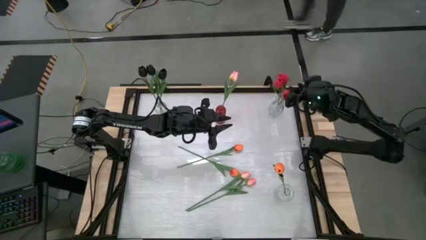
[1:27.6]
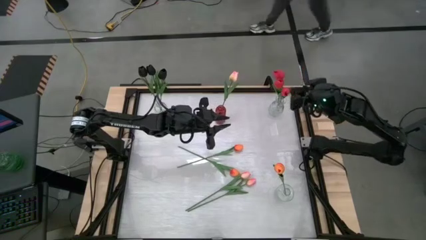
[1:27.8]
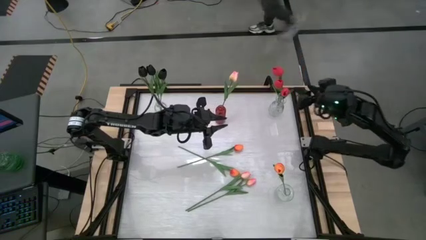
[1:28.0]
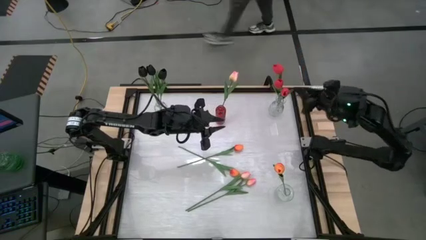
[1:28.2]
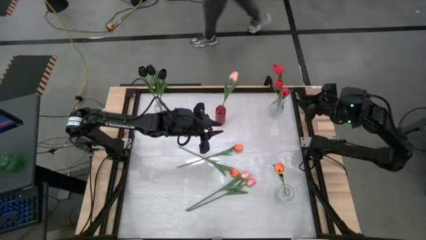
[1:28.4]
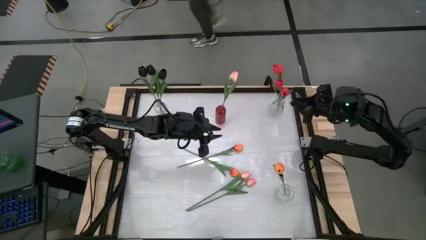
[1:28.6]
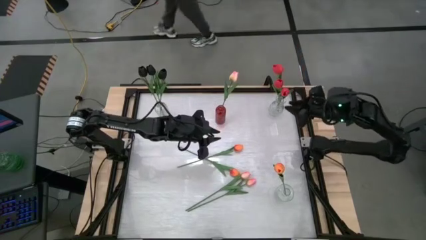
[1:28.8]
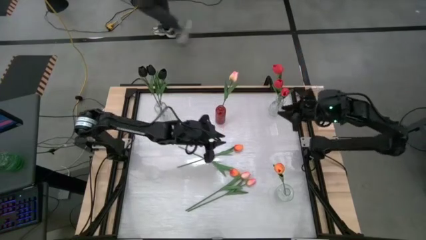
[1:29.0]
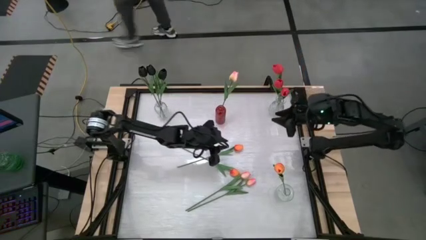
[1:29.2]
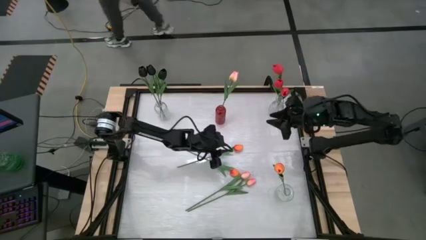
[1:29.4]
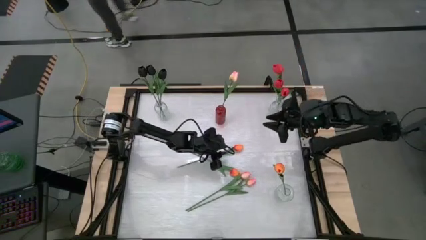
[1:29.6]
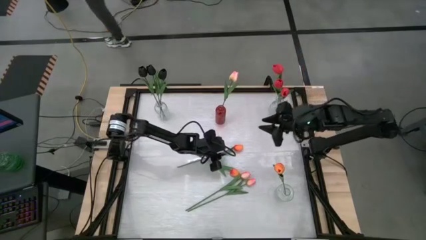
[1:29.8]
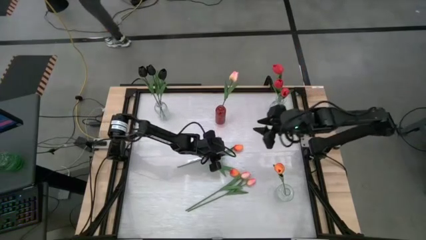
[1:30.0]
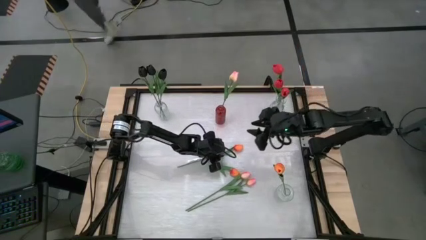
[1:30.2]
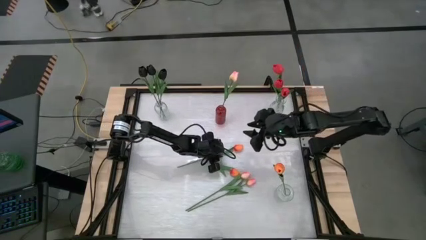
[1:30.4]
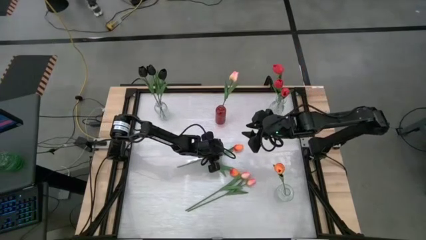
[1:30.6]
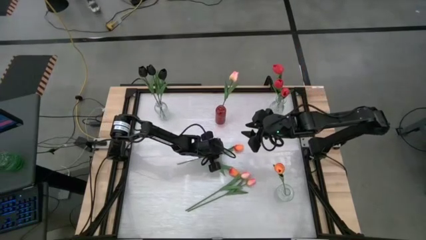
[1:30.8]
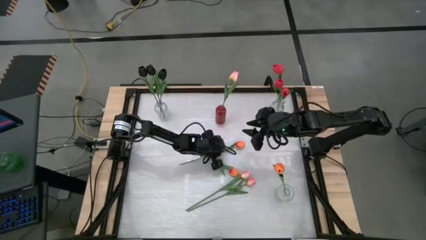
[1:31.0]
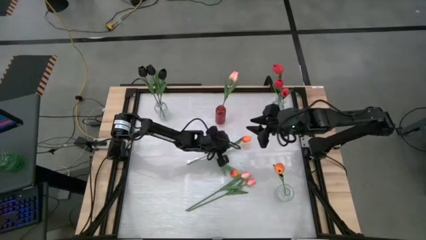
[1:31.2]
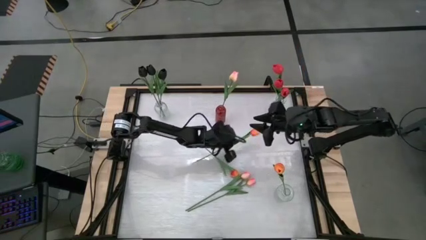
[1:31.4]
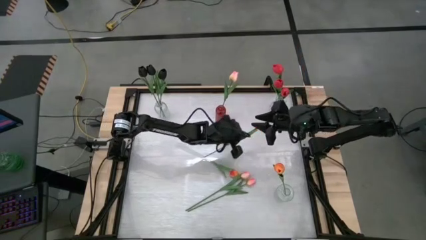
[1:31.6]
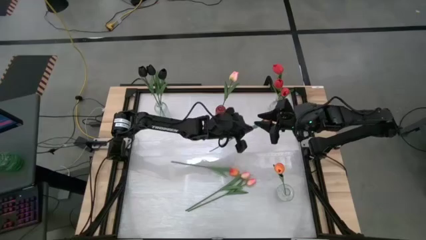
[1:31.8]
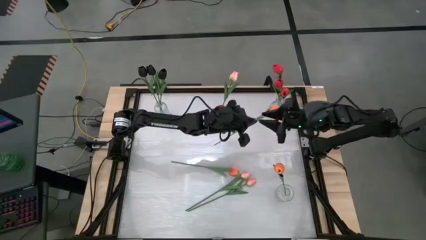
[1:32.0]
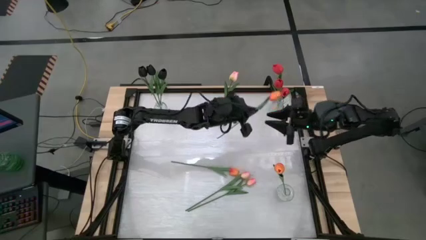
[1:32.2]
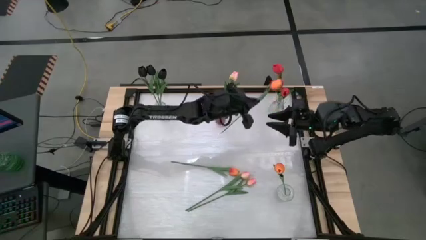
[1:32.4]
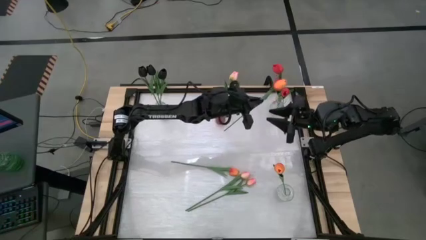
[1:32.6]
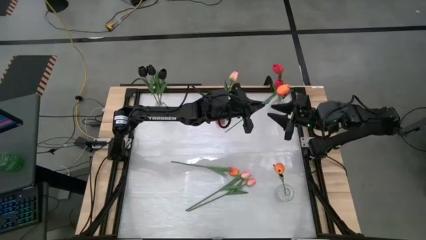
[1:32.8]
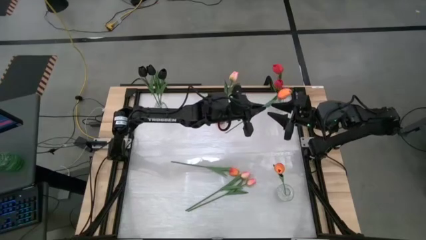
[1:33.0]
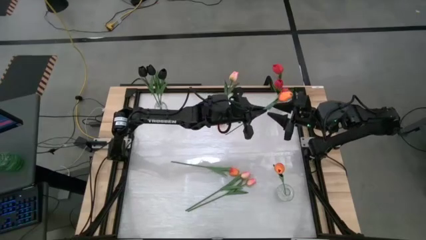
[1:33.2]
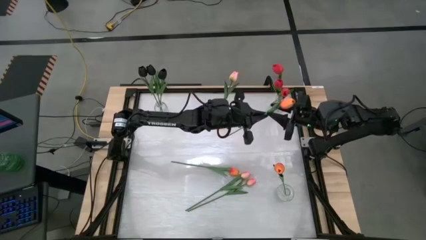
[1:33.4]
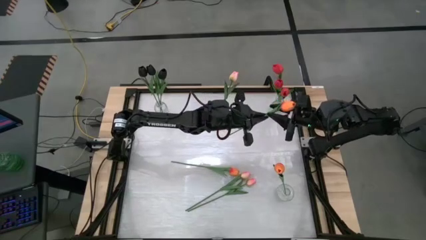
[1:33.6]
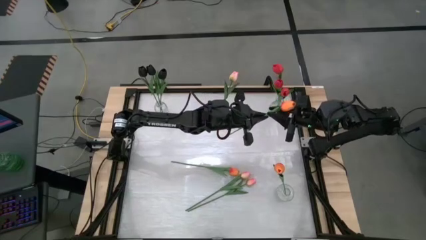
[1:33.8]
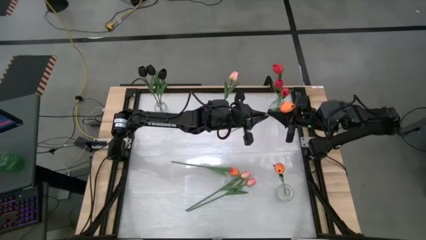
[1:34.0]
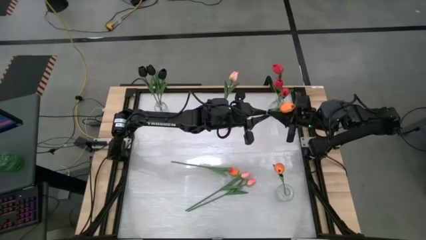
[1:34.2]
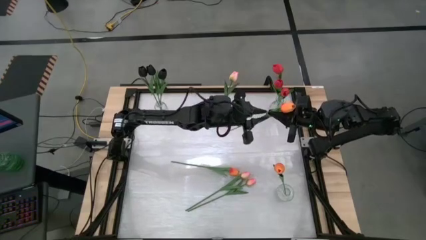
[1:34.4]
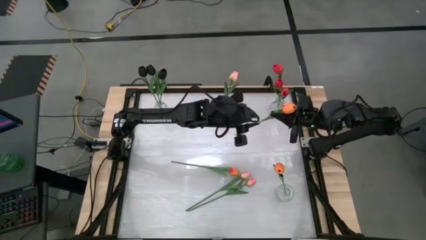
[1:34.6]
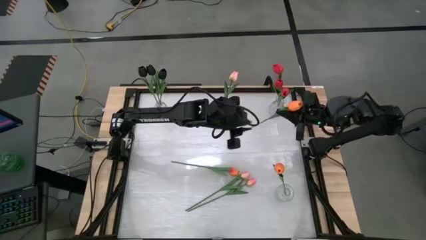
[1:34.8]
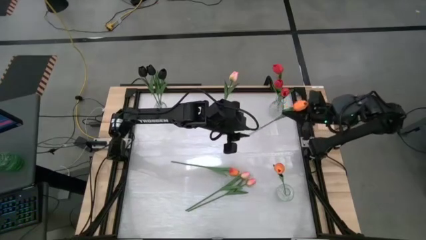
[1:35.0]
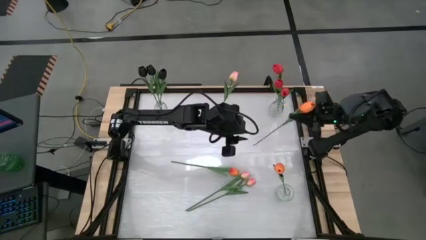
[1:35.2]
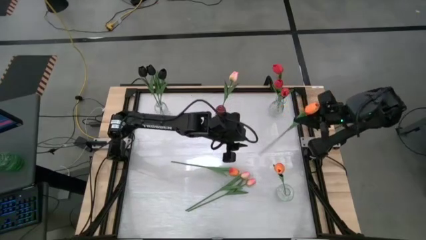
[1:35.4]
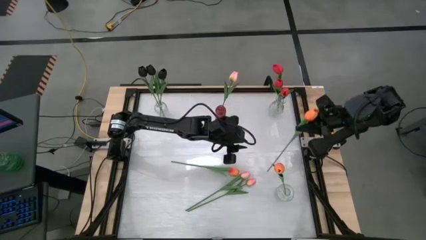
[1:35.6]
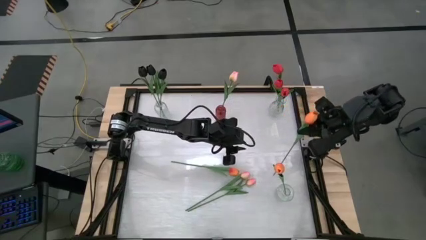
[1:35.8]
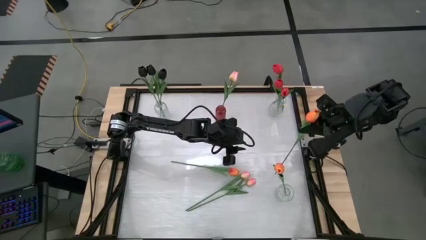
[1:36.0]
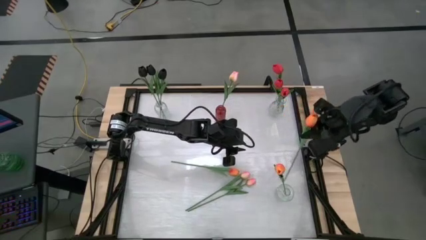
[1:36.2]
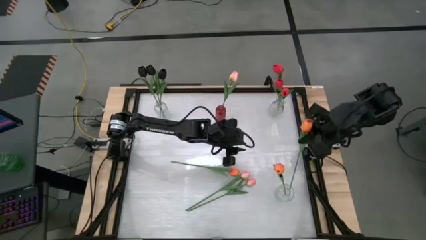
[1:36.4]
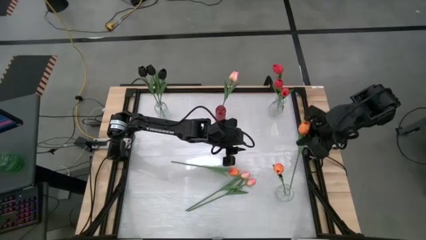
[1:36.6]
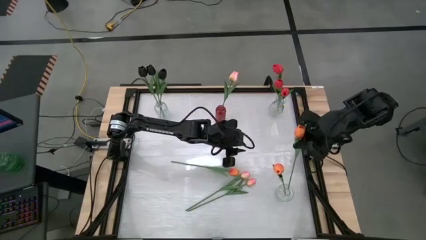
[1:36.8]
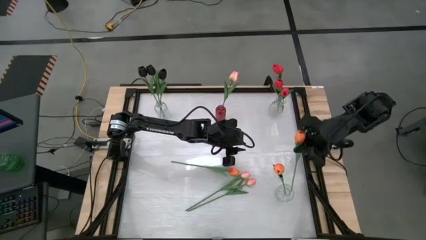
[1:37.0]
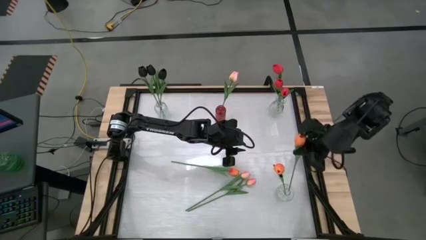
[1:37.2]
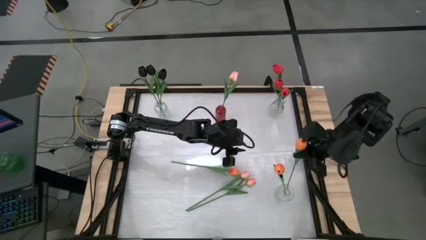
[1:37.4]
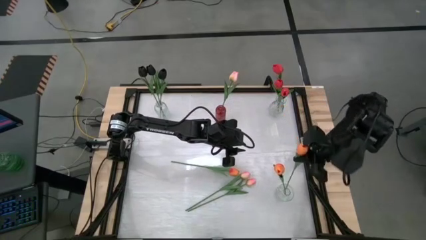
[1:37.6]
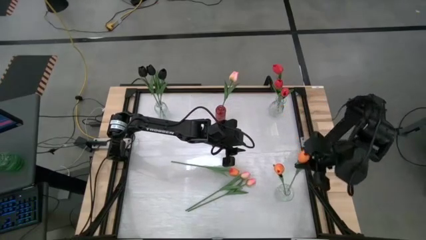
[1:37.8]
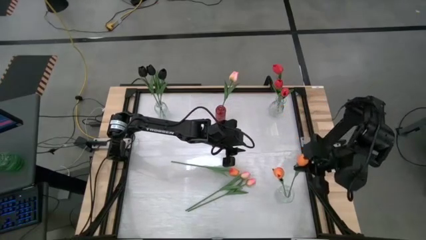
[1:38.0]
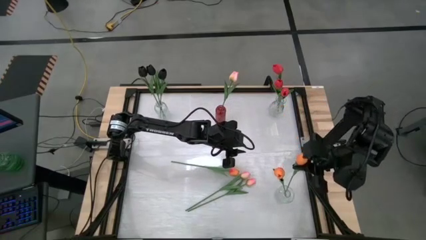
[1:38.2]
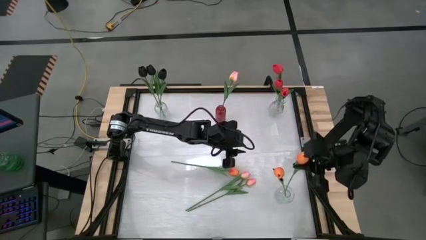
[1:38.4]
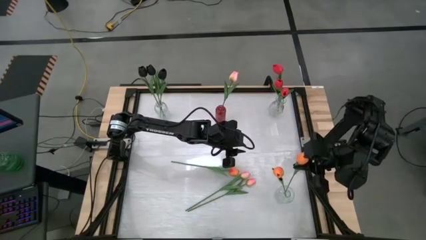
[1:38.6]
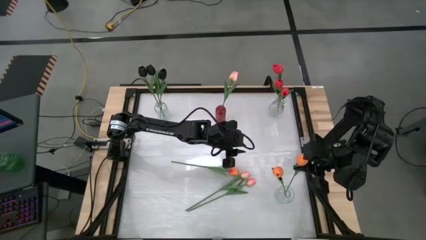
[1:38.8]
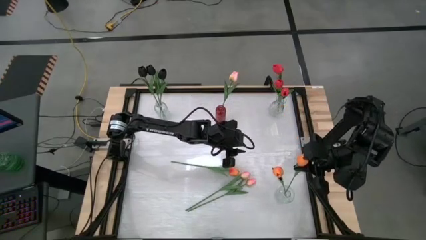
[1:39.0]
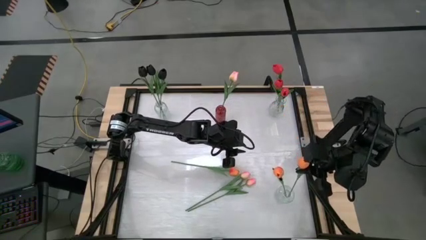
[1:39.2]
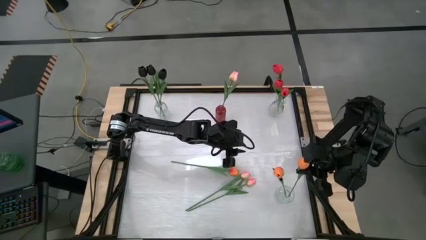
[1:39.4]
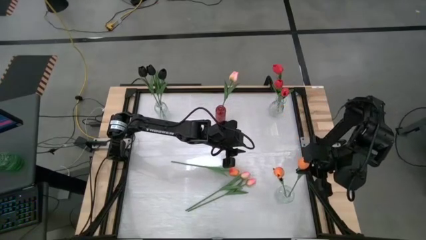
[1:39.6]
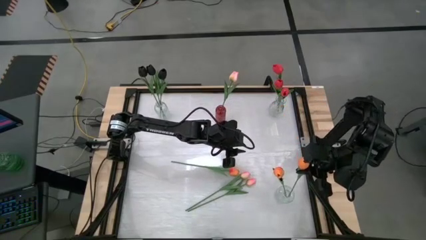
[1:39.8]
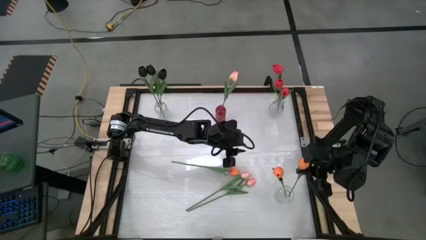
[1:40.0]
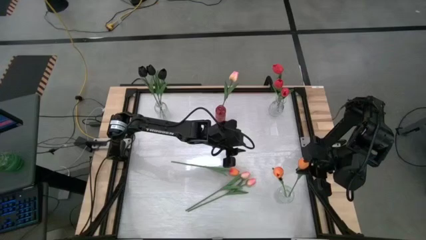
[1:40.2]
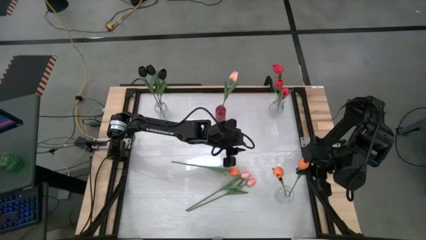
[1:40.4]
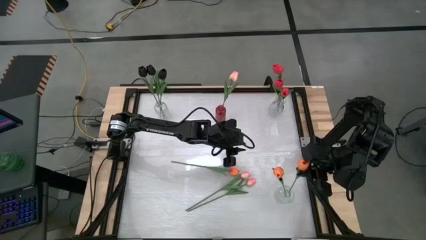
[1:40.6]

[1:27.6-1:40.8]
Task: Sort flowers into vase by color
Put the top orange flower into the bottom transparent vase
